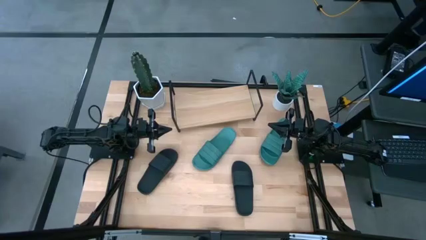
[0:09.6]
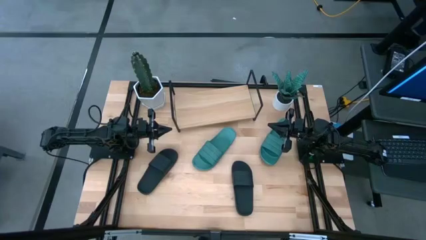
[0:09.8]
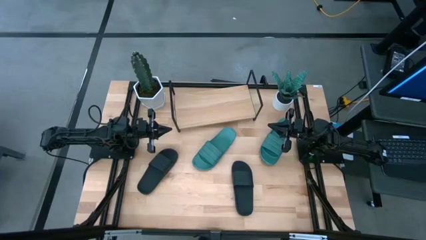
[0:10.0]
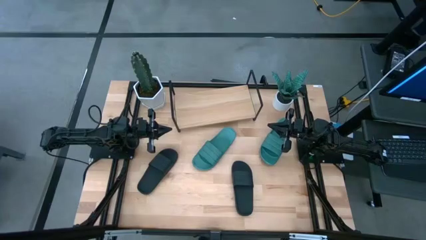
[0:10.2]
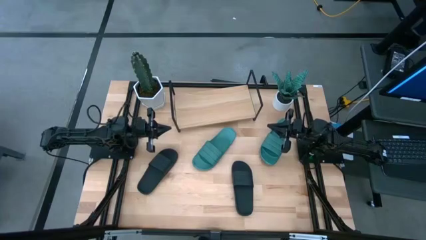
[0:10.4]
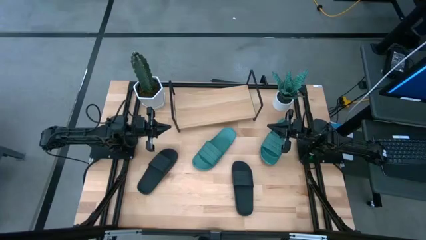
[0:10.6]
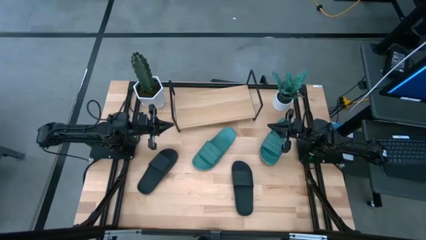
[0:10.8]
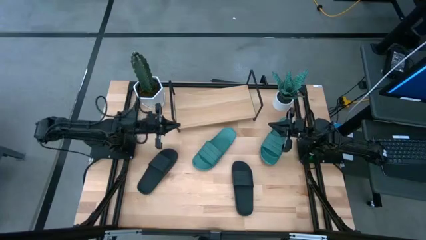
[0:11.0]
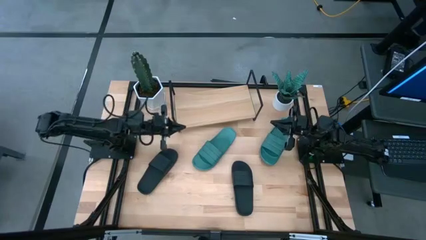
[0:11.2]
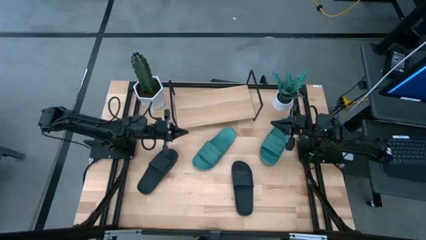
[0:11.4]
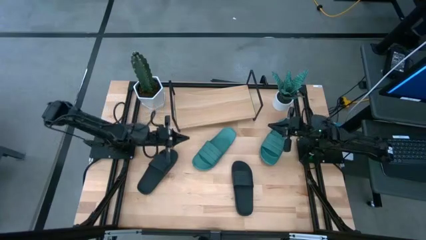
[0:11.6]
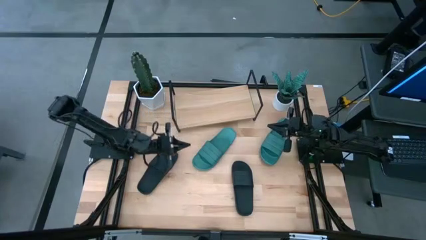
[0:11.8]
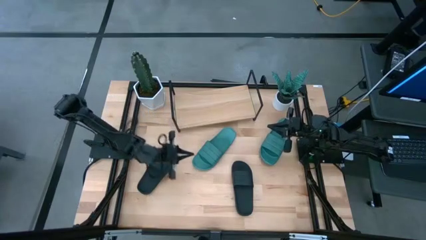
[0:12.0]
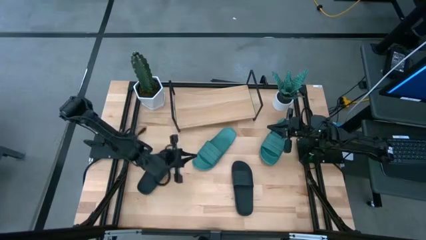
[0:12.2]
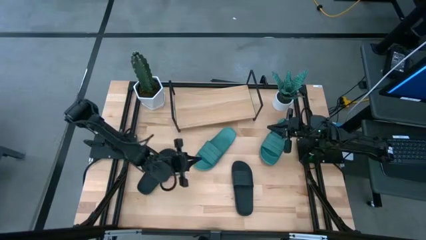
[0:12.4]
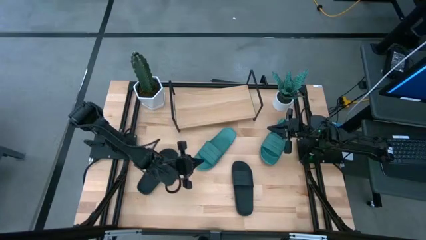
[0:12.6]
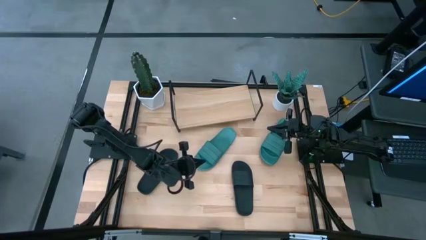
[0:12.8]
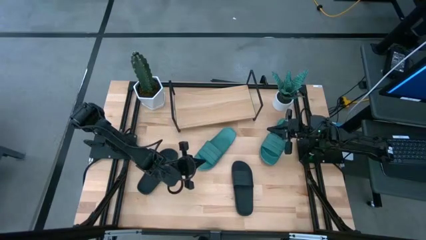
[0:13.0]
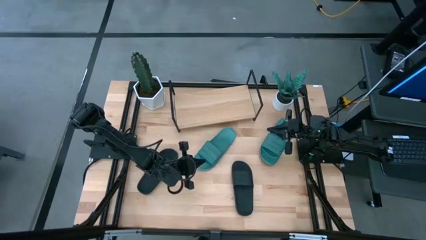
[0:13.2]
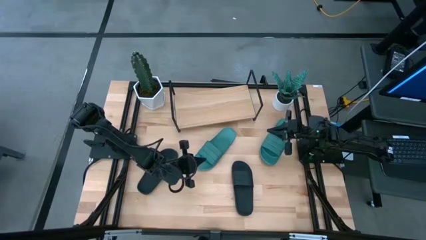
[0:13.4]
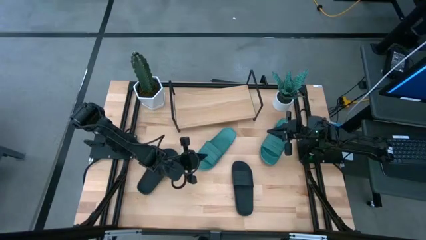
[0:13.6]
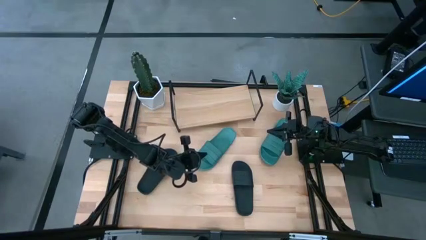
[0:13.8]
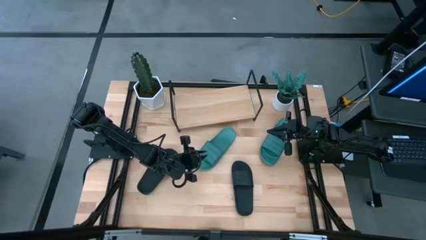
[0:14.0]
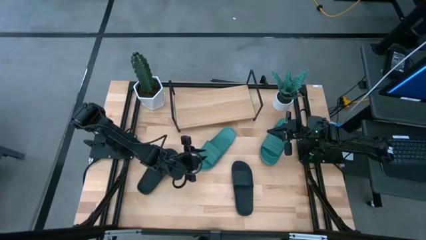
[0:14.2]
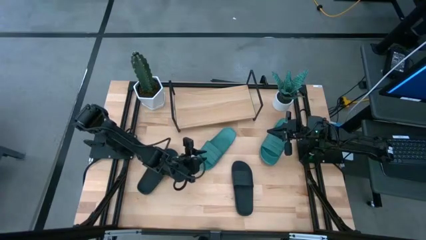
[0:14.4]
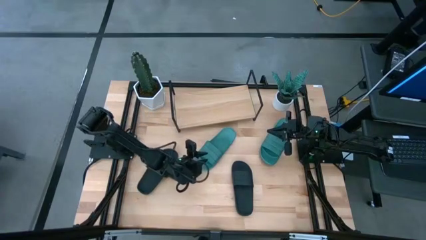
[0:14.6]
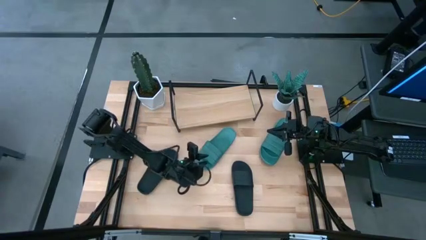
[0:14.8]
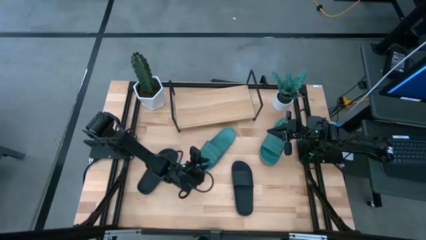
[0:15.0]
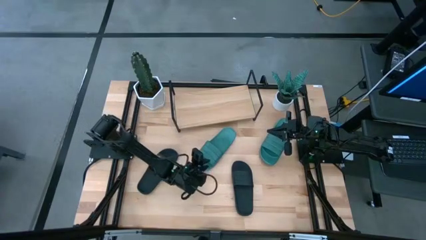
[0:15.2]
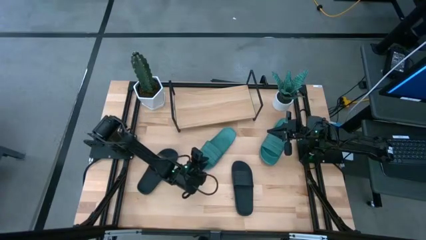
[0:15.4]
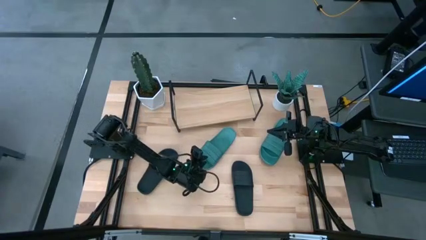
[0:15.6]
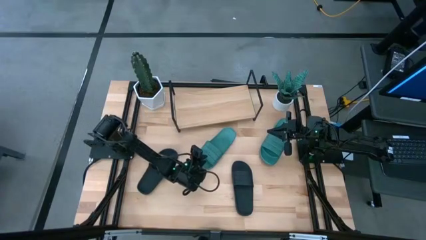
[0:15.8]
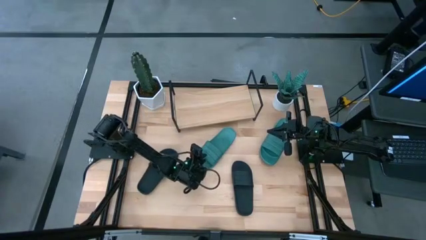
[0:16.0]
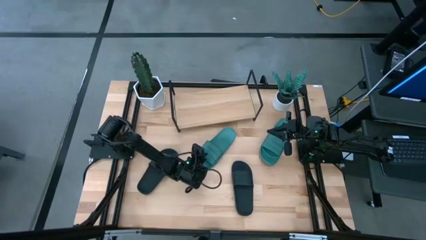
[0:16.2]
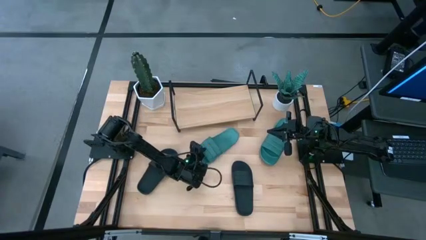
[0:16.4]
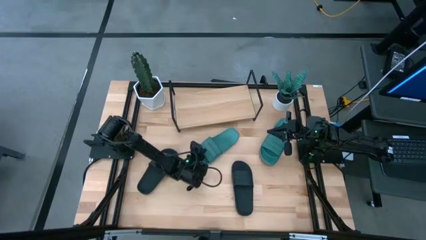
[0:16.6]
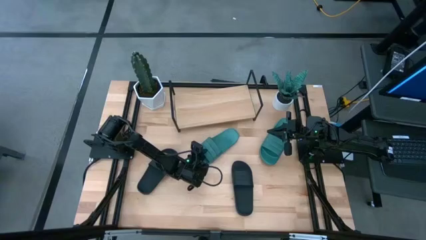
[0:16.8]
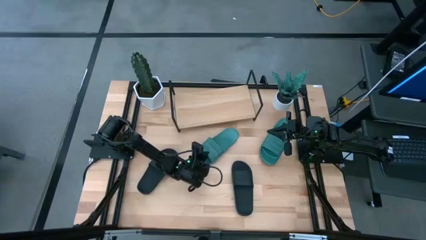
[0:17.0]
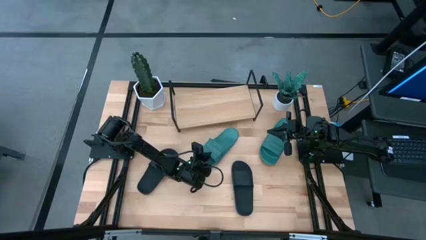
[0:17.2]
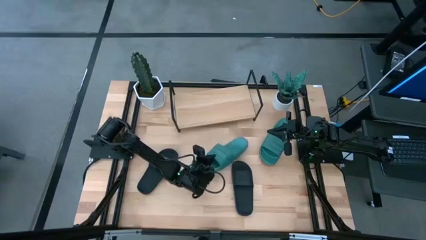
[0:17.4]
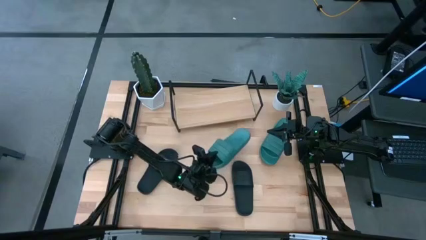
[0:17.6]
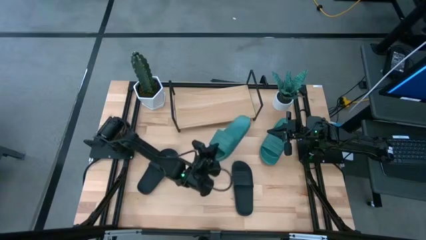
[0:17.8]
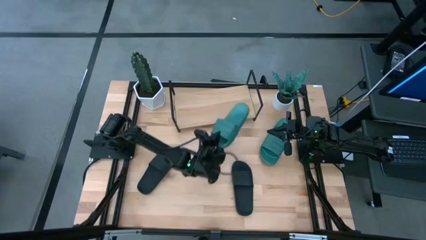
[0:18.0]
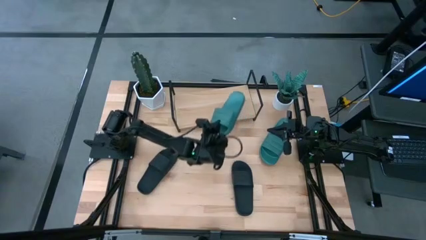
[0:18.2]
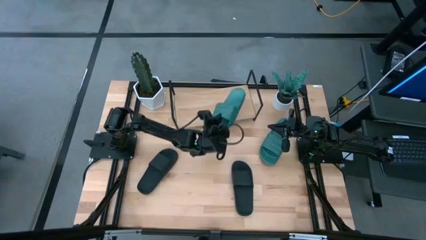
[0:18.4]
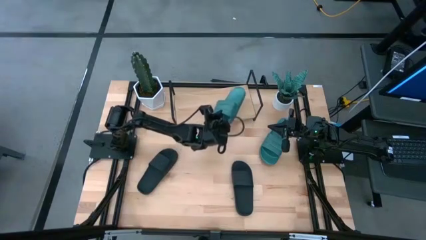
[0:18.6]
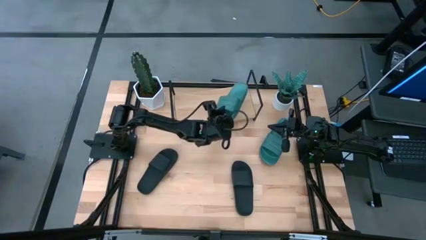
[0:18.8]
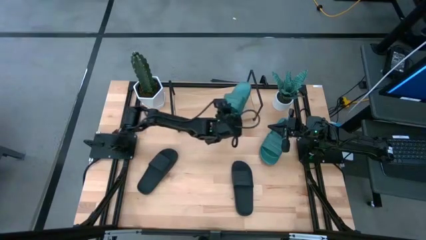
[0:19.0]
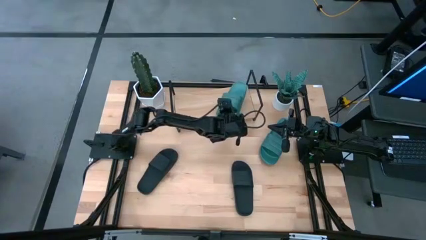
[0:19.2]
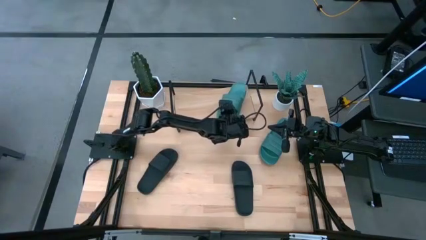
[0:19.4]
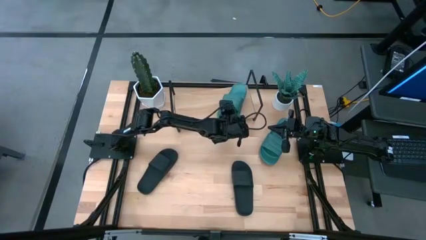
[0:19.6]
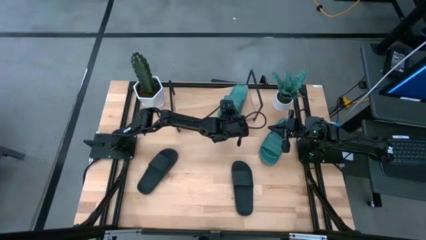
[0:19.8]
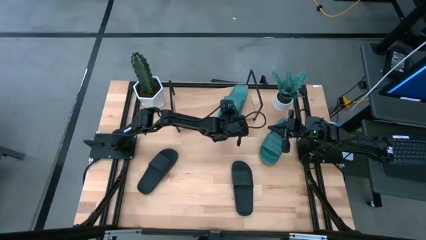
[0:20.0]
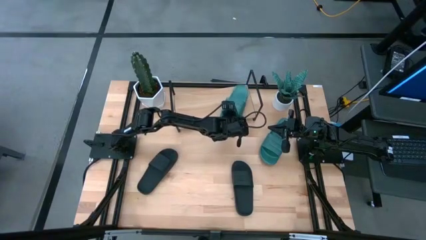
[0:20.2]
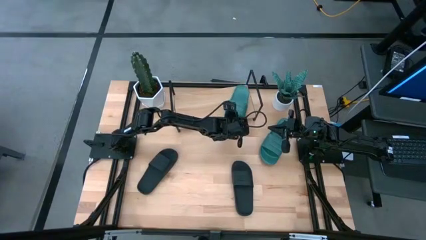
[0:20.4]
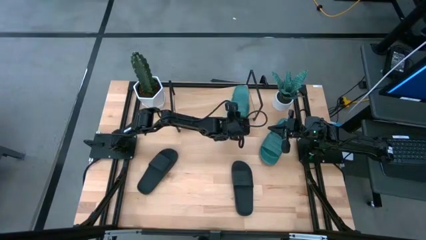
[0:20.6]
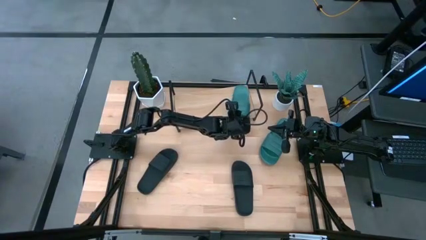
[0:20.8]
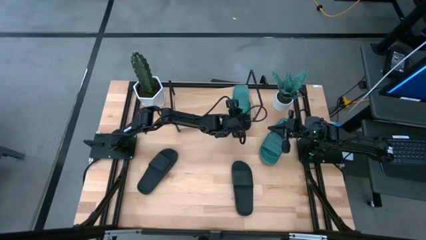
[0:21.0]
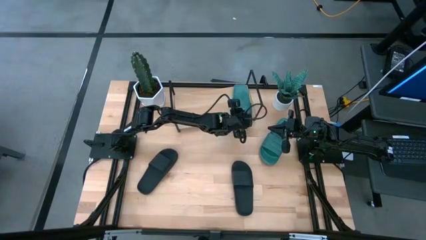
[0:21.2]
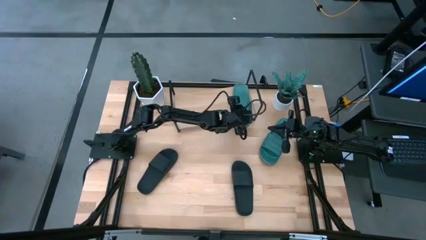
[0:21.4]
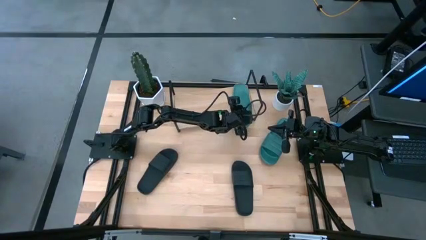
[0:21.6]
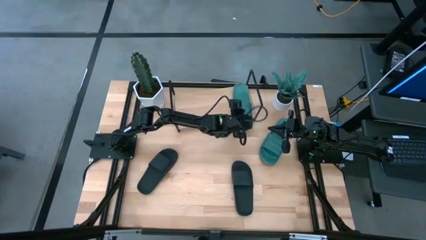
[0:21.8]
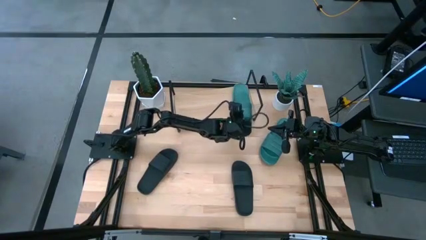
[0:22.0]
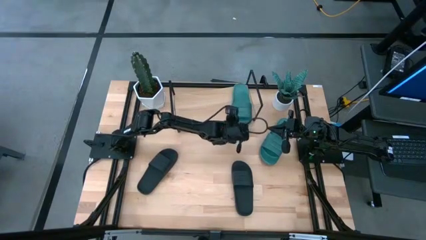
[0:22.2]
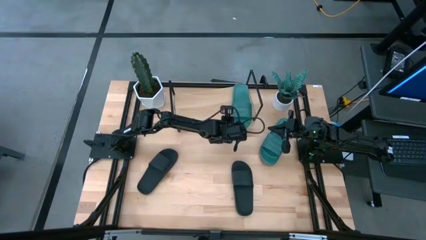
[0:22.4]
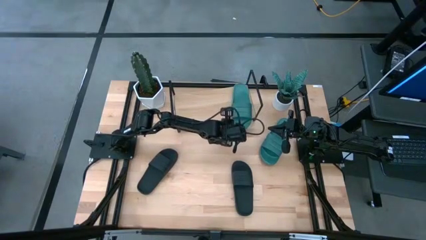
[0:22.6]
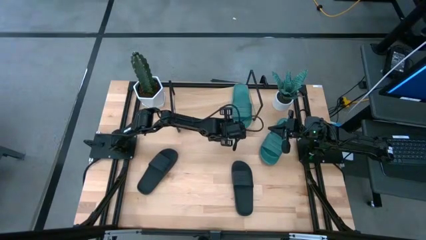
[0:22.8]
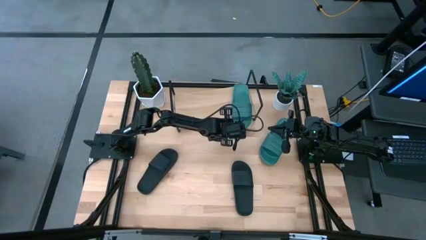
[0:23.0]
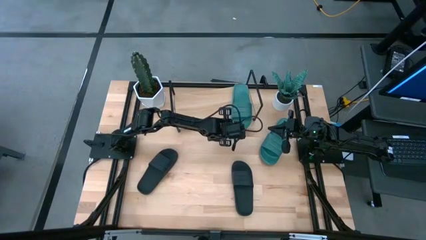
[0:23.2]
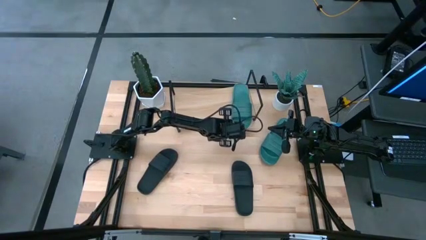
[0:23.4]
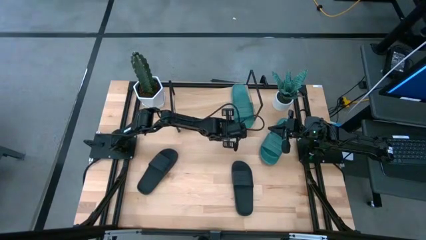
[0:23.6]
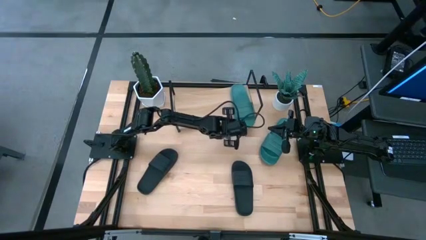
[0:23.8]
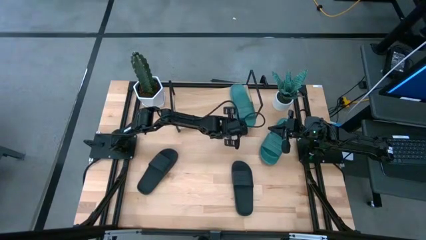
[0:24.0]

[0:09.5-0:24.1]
Task: Pick and place slides into the shelf
Put the left green slide on the shelf
